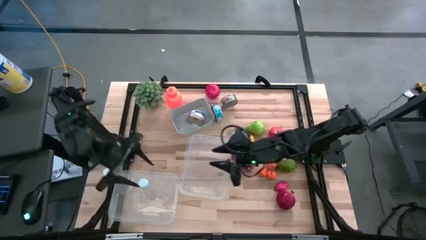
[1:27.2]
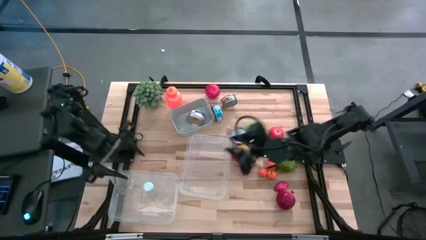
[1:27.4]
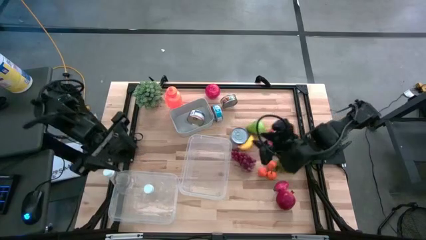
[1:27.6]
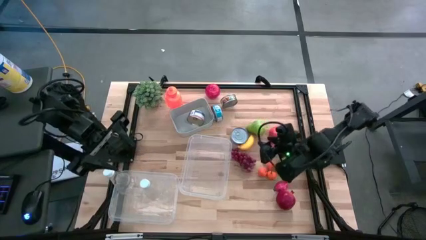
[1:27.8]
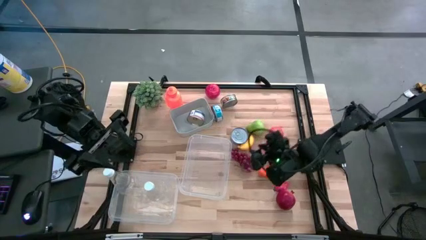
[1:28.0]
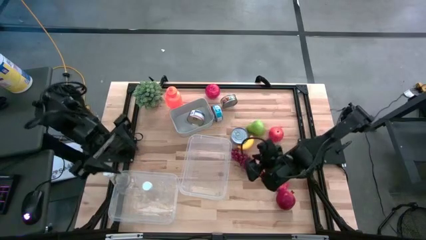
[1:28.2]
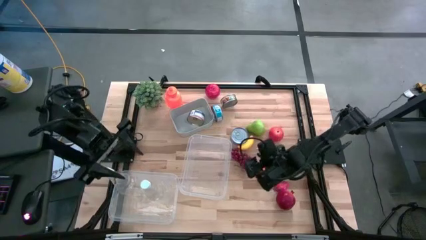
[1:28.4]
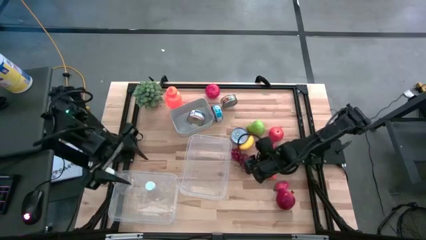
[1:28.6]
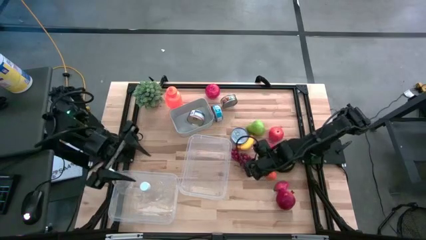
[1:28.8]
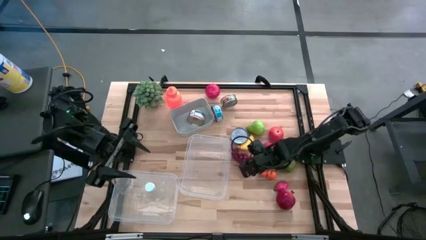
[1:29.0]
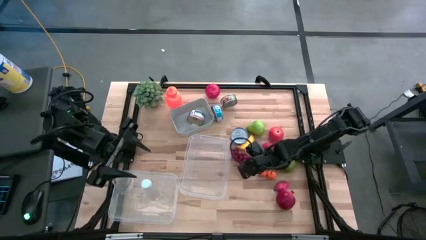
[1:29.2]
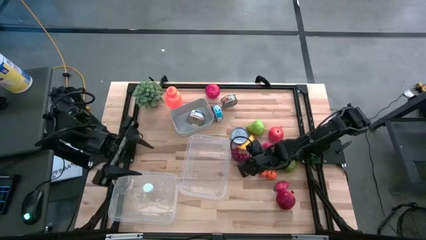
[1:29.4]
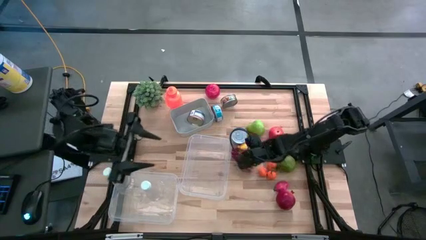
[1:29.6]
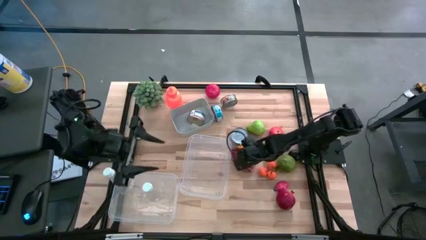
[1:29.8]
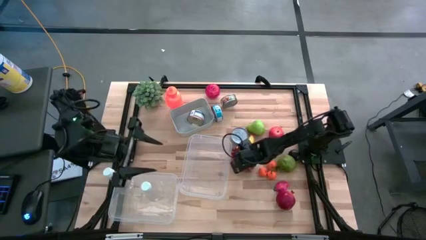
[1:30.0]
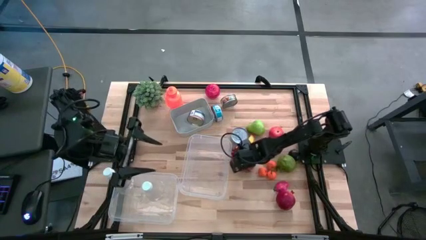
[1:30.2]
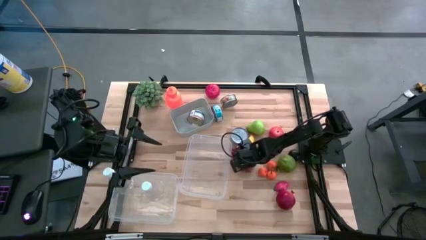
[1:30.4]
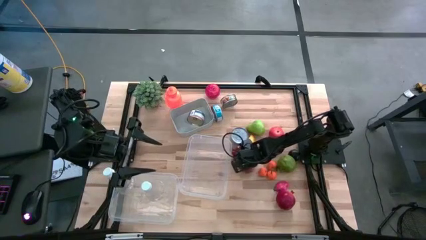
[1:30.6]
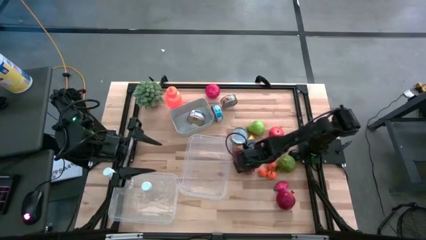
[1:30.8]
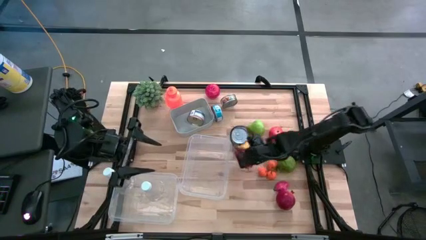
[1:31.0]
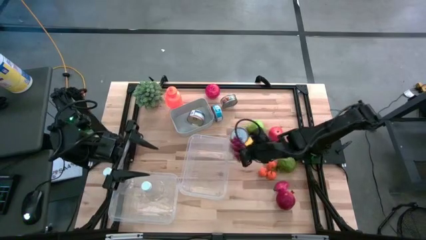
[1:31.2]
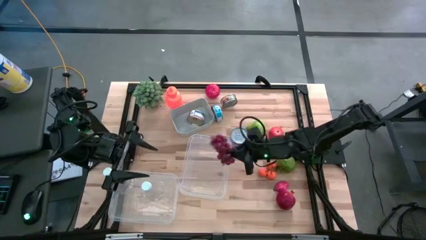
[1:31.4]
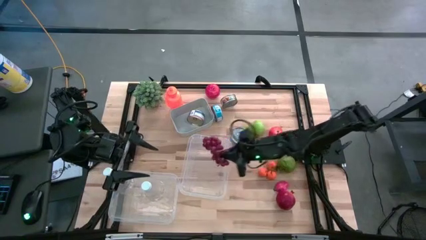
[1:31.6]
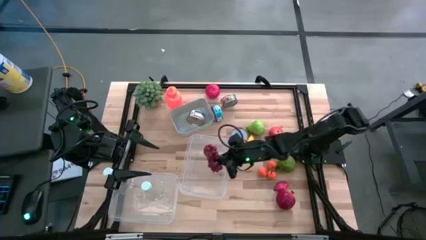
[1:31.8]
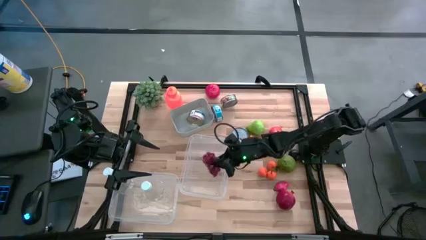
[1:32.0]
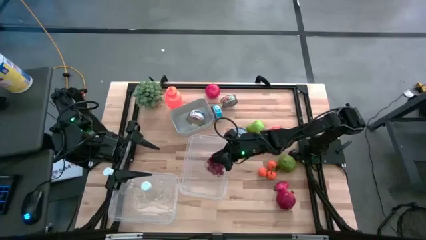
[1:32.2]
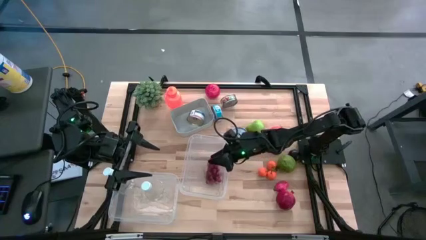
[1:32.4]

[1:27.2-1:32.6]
Task: Pick & Place Food Item
Put the grapes into the right transparent bin

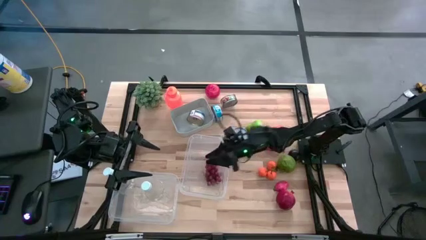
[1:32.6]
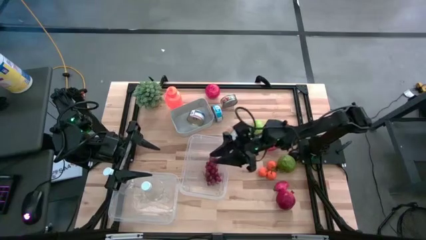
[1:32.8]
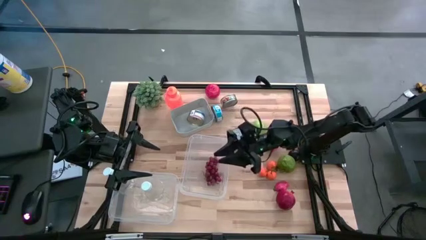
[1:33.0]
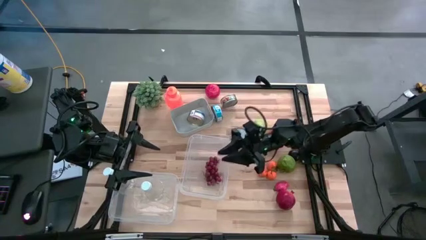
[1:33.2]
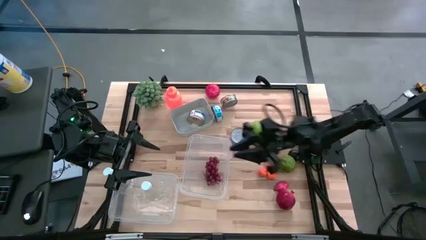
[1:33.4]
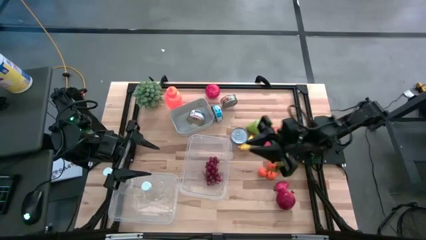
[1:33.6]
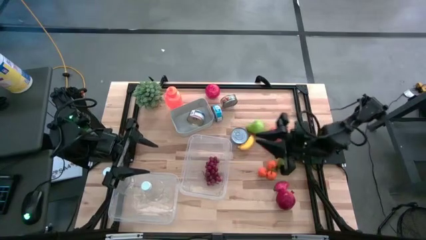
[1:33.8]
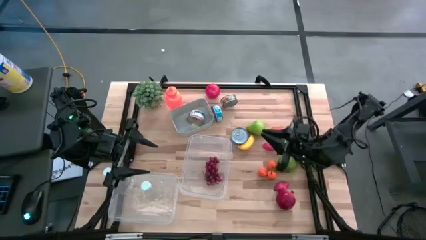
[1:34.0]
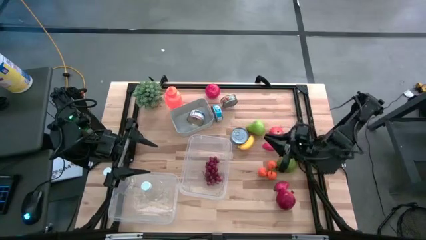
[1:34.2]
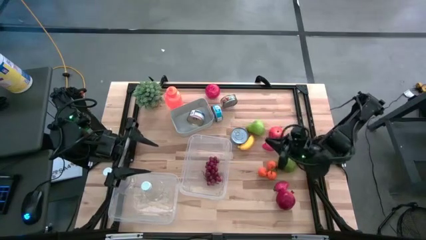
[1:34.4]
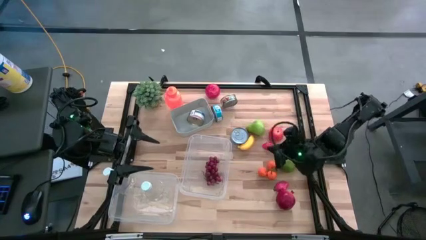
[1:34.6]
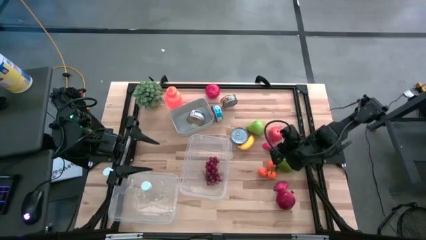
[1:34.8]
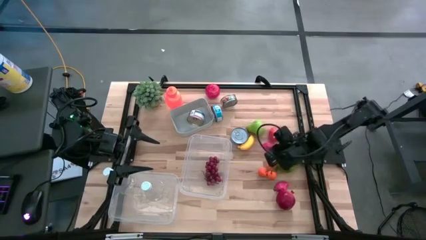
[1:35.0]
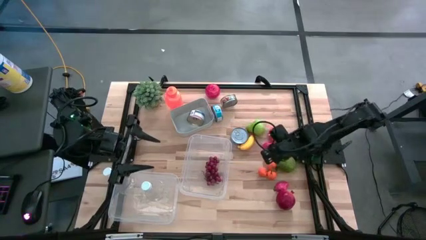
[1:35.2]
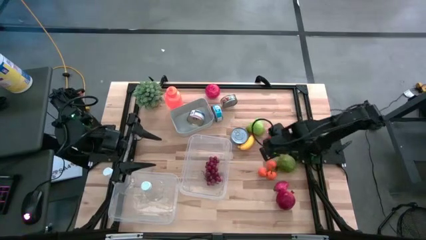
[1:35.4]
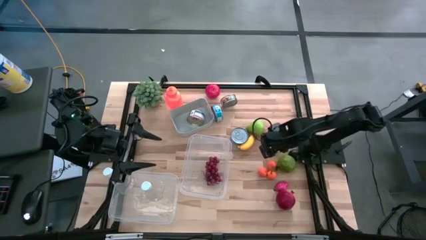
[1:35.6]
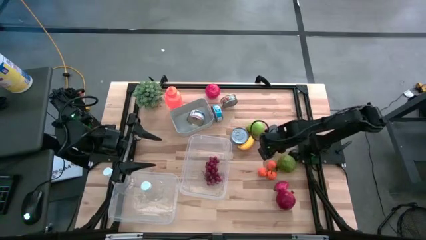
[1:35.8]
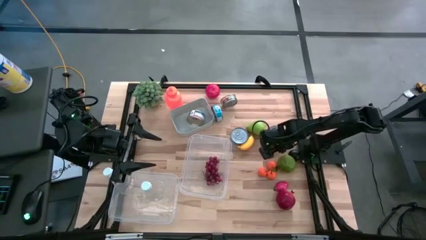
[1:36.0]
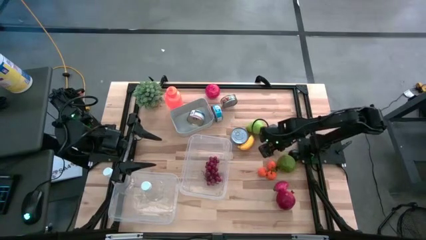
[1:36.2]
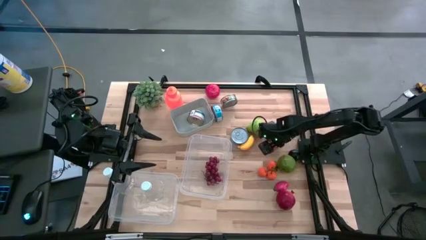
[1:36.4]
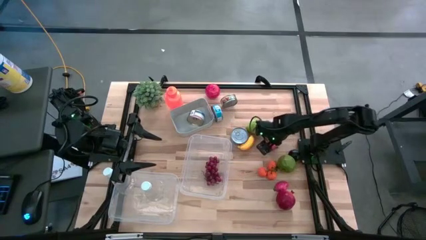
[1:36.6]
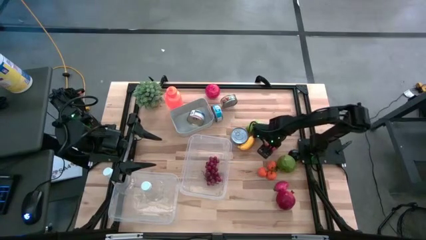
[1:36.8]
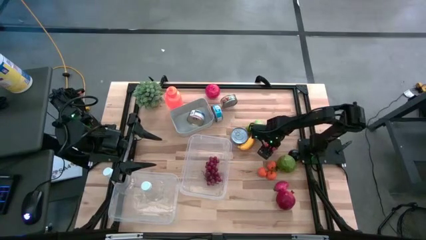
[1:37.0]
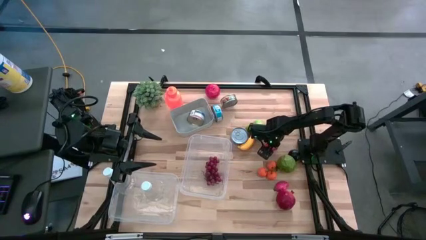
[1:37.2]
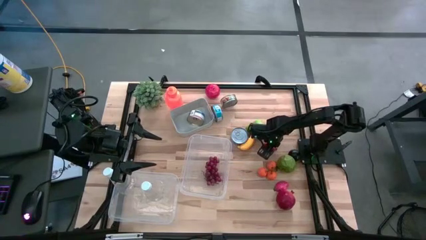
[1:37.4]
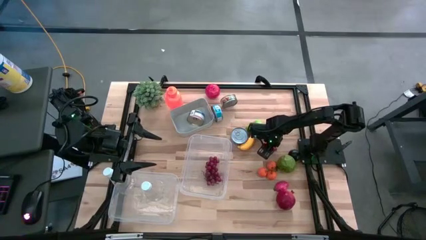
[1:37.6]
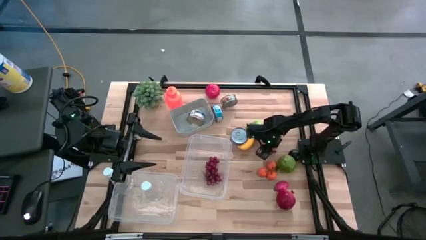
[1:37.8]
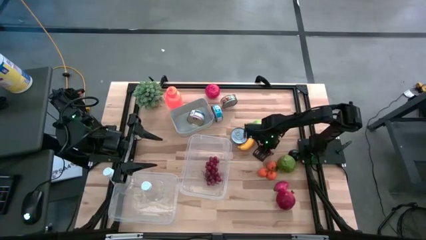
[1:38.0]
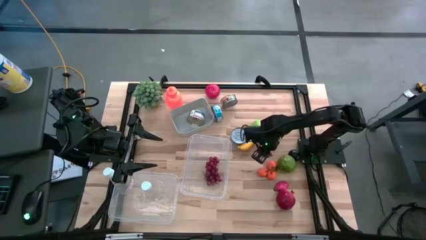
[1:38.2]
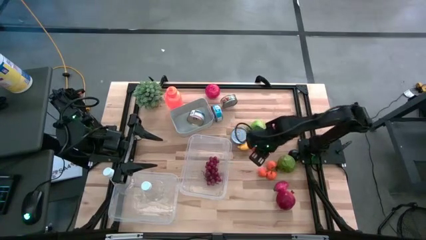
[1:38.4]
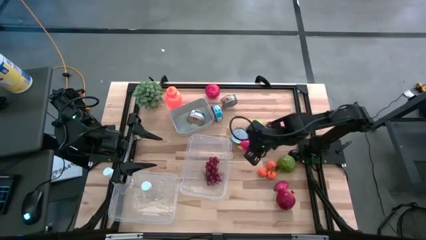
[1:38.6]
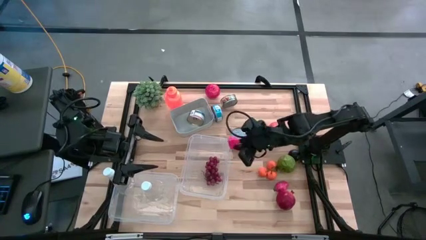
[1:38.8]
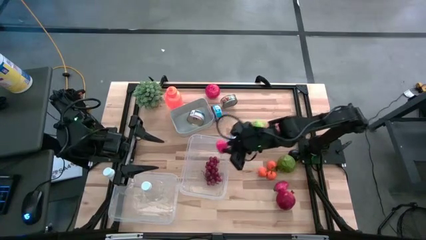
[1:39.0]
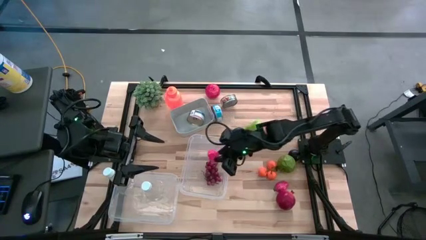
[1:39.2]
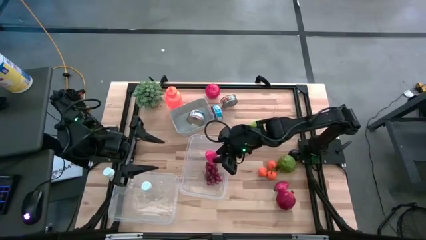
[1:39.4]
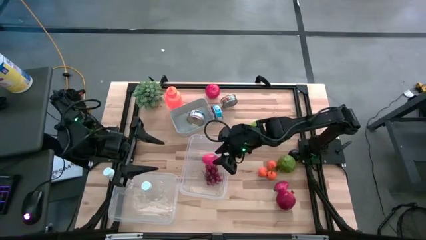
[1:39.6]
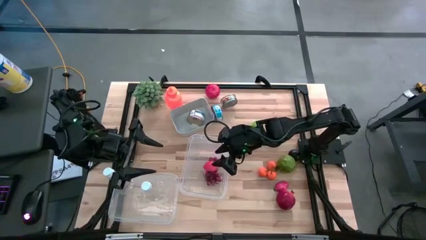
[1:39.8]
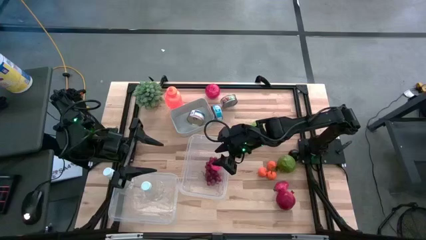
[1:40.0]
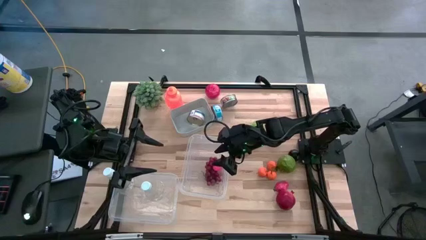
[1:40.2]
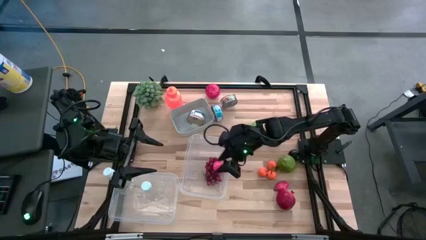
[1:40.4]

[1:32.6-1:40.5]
Put the top pink dragon fruit into the right transparent bin

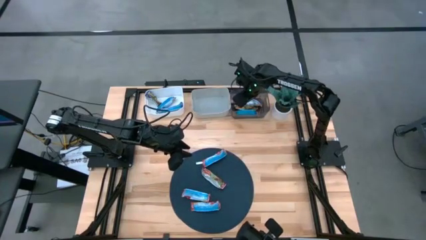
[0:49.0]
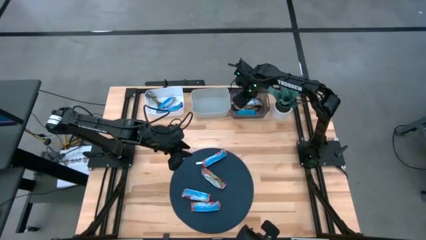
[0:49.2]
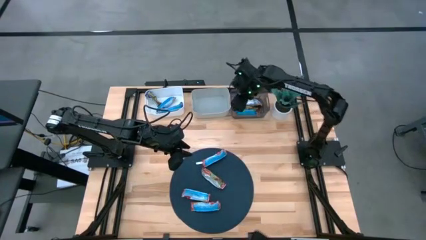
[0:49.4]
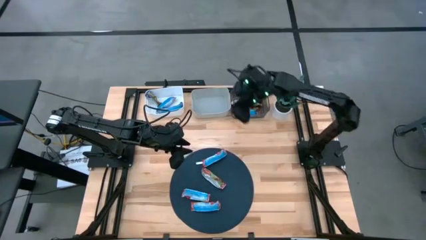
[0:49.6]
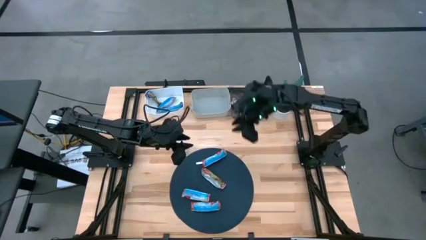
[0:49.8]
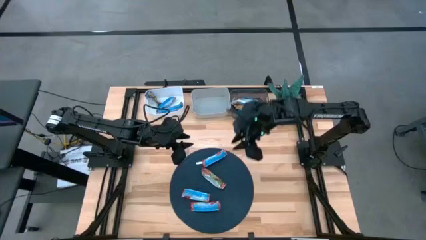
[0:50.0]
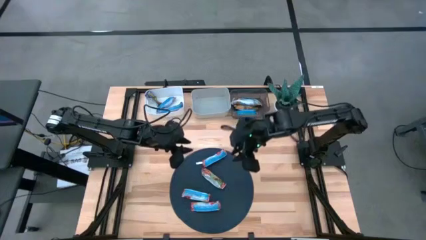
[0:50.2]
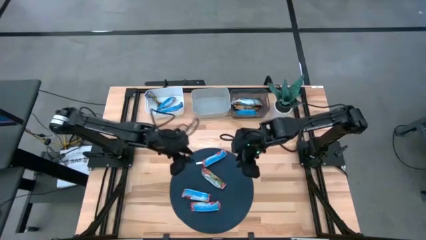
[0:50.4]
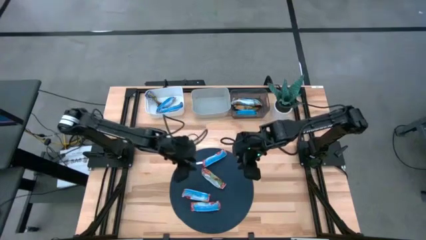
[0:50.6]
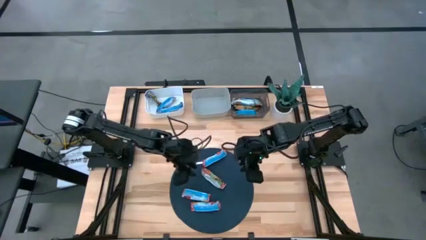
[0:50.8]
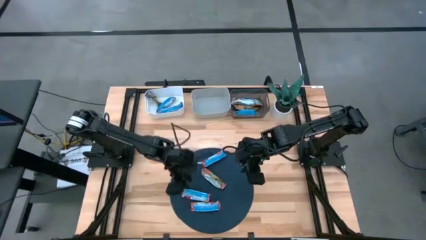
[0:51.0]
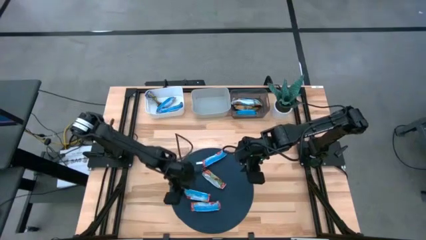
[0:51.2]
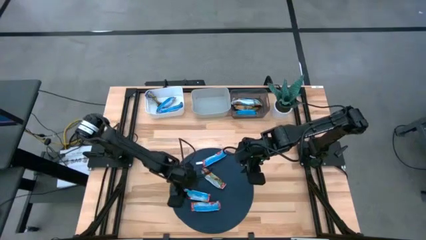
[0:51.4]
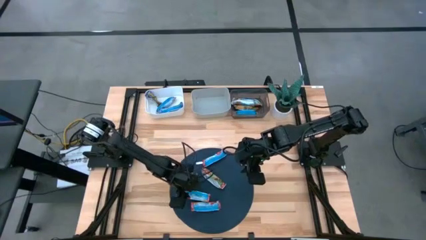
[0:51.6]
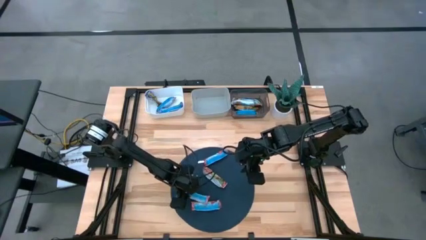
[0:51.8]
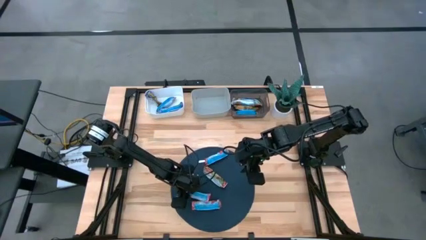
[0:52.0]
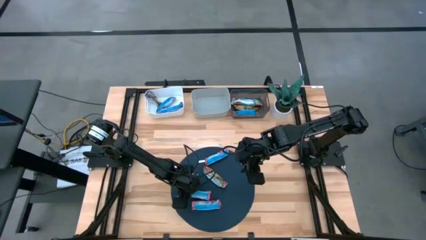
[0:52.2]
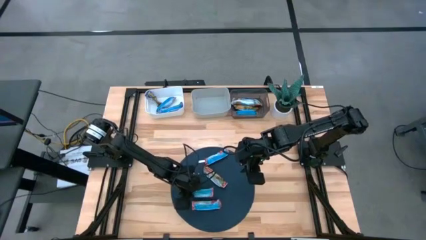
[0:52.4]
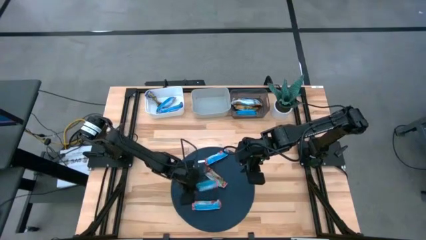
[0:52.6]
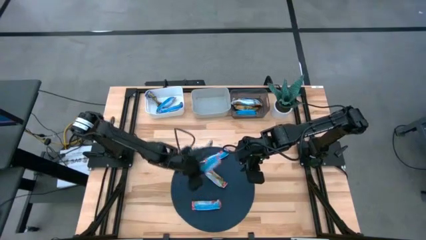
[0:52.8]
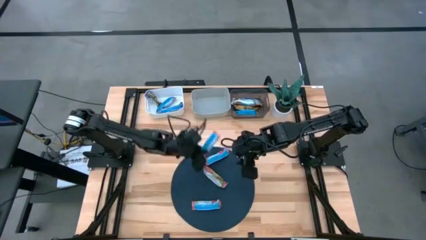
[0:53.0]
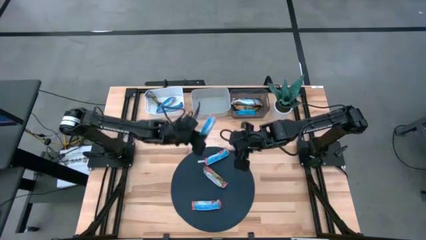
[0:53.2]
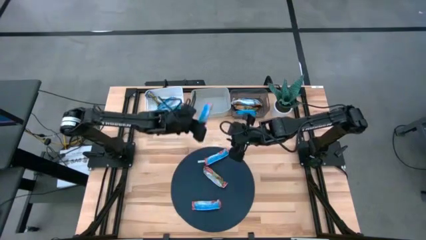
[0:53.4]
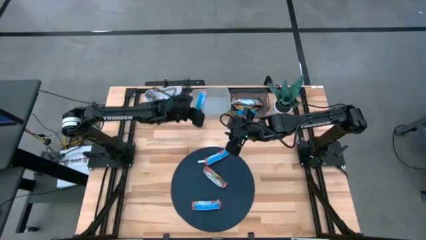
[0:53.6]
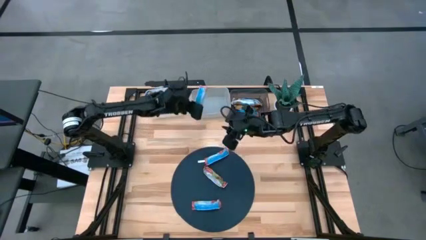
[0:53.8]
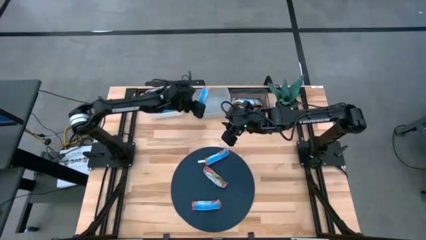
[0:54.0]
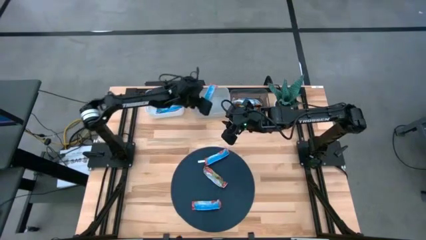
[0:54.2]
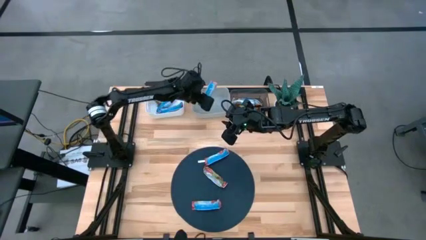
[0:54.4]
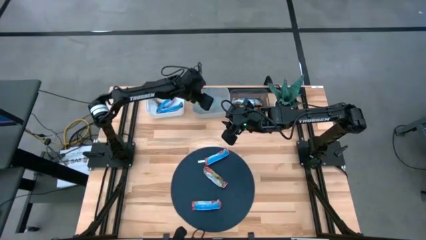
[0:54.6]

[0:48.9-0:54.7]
Task: Pick and place Granola Bars by type
Put the red granola bar into the gray bin
